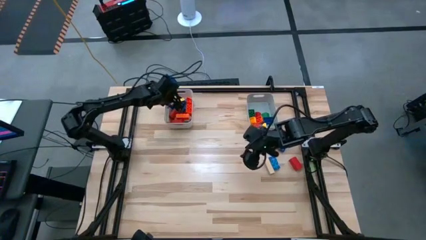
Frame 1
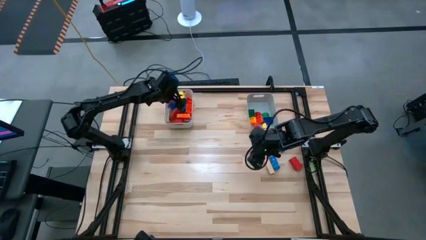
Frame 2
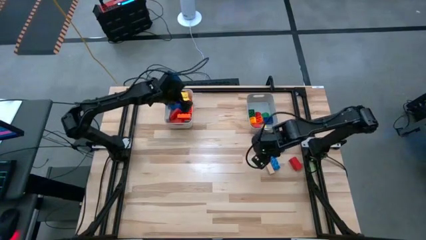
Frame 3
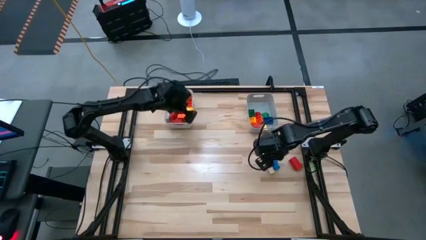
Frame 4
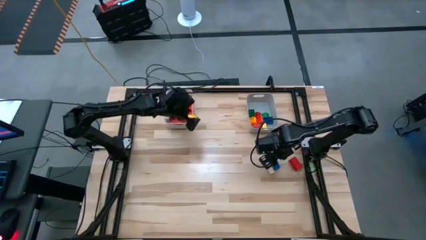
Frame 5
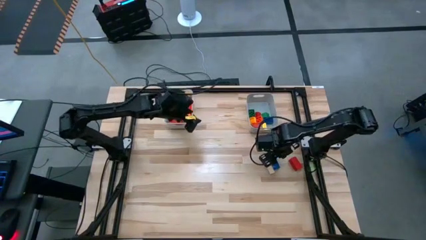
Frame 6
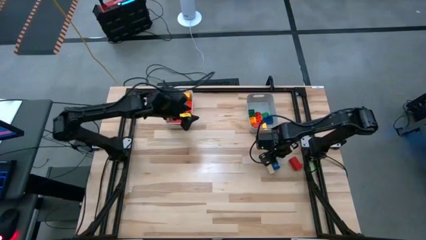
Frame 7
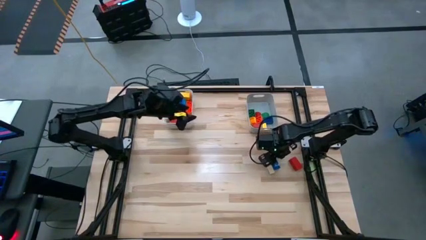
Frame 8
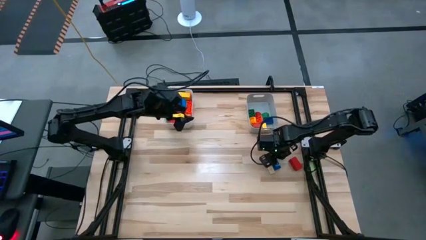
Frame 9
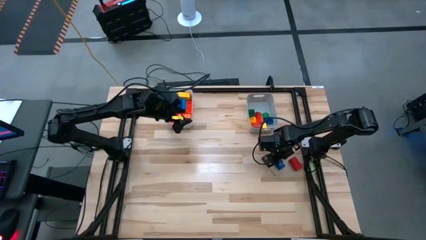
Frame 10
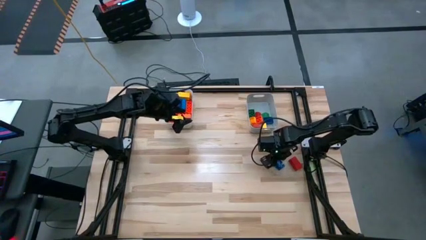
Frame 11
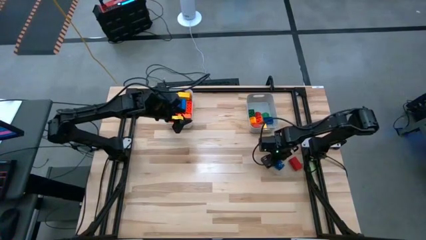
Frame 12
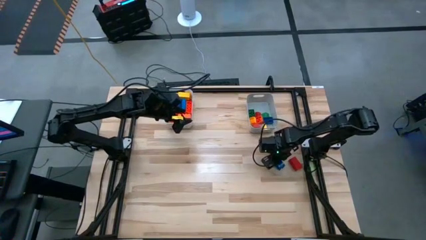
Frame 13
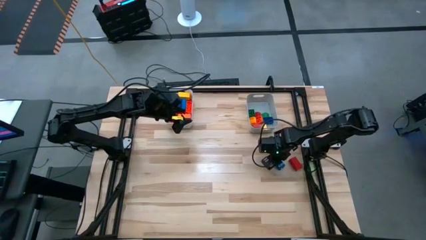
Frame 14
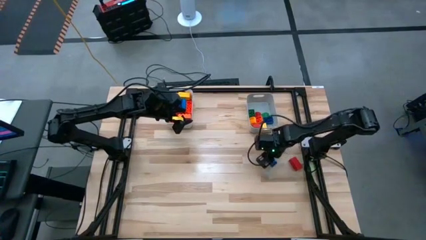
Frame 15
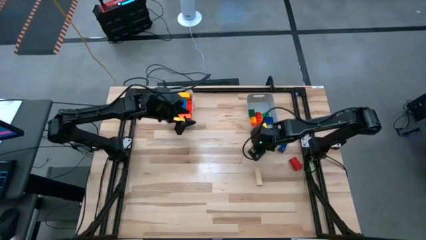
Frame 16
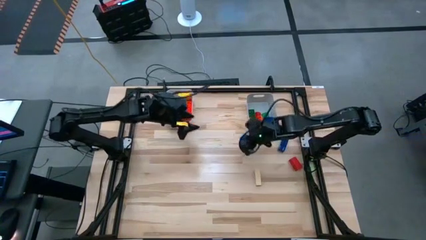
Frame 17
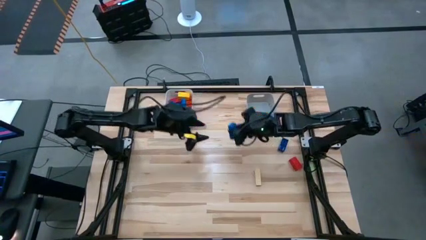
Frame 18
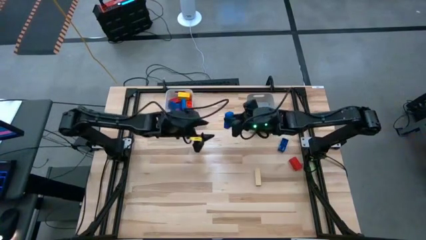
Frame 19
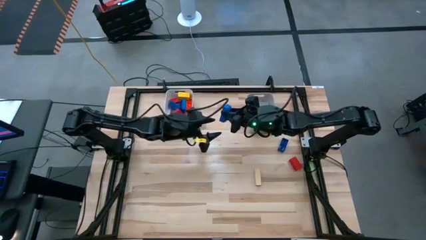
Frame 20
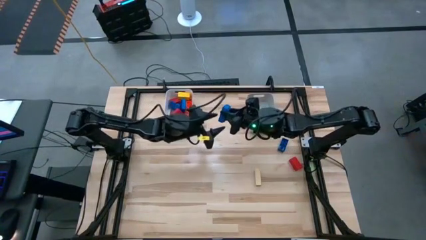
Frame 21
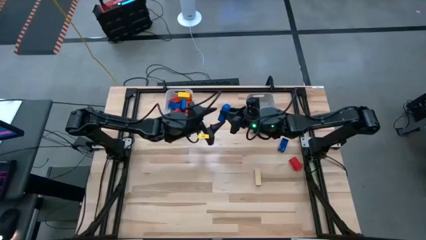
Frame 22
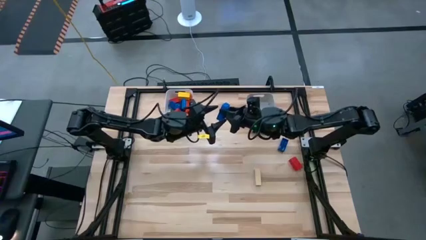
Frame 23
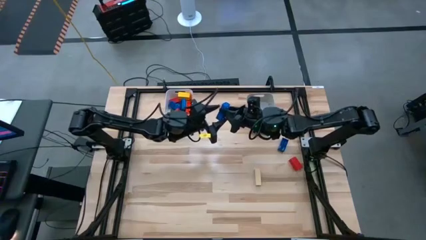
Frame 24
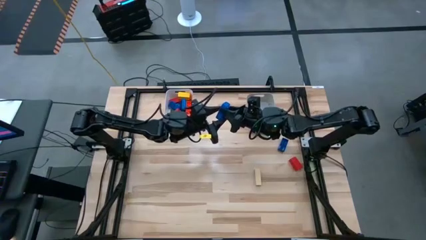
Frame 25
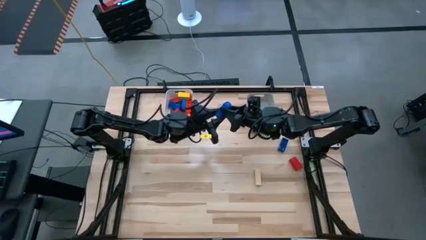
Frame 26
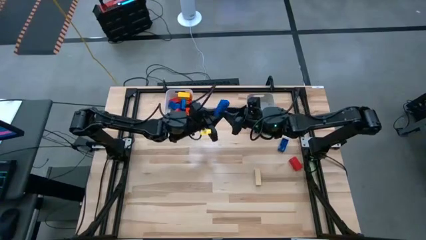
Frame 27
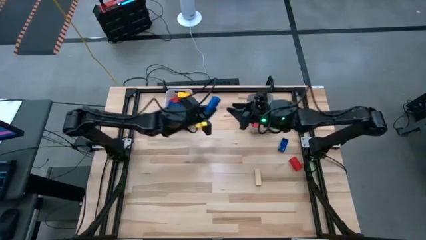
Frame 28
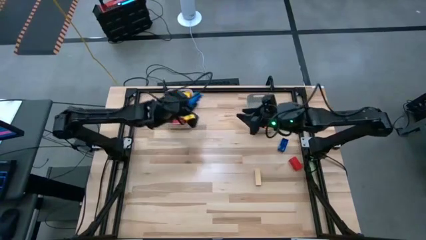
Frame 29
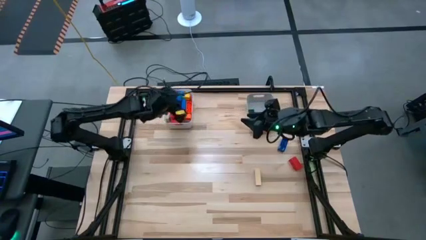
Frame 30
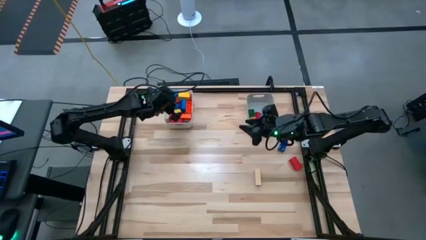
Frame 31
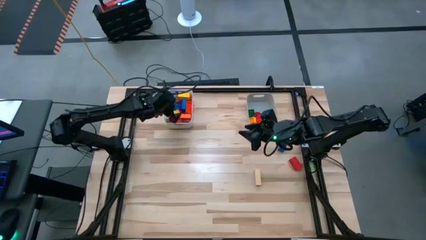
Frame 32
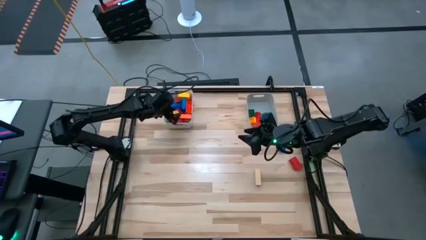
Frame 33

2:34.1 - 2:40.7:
Task: Sort blocks by size
Put the blue rectangle game piece into the white bin

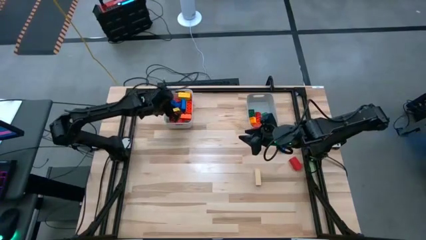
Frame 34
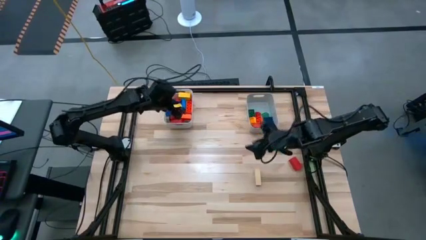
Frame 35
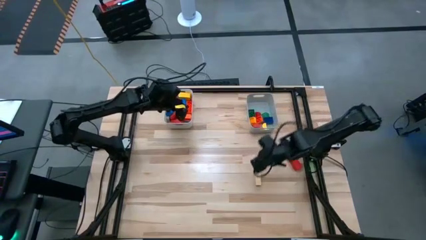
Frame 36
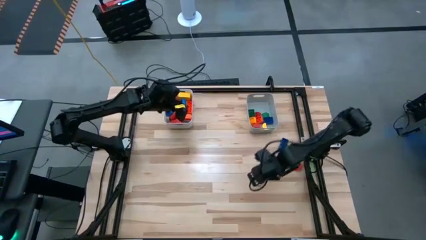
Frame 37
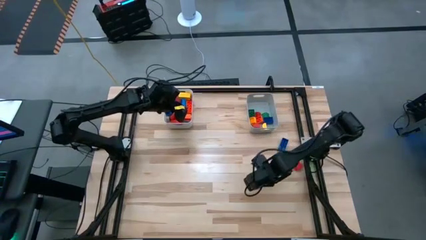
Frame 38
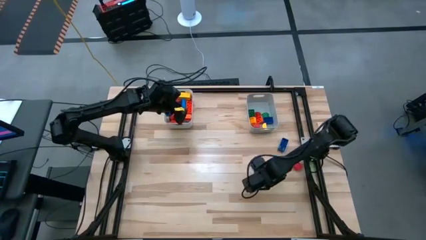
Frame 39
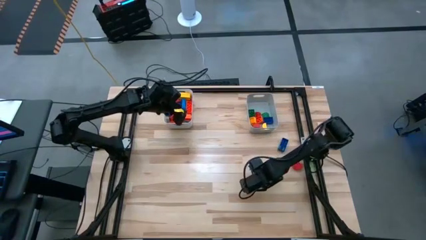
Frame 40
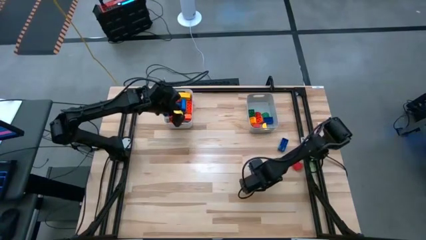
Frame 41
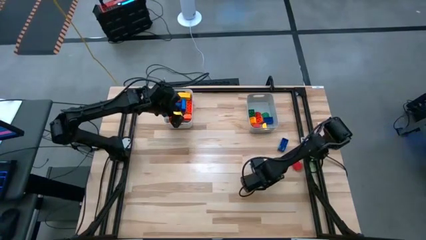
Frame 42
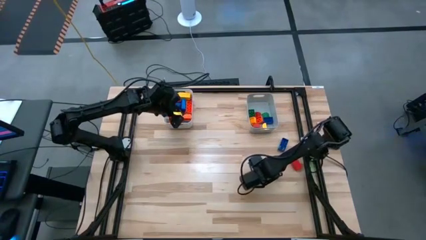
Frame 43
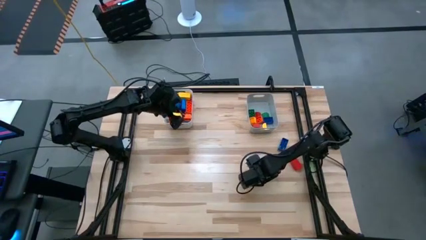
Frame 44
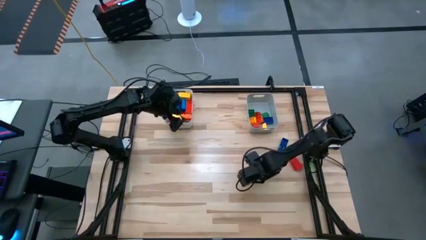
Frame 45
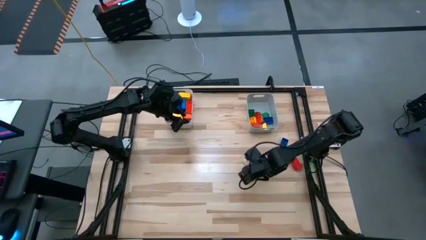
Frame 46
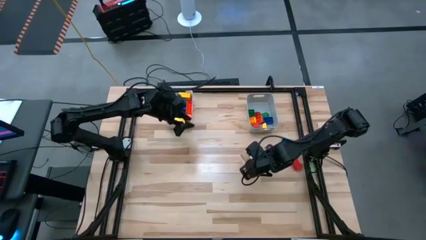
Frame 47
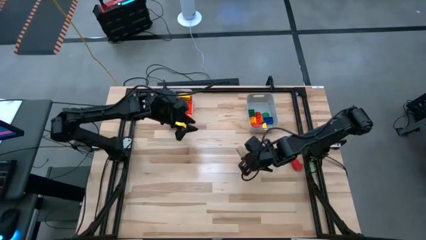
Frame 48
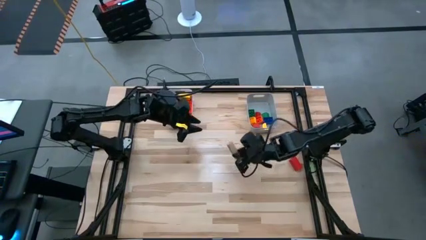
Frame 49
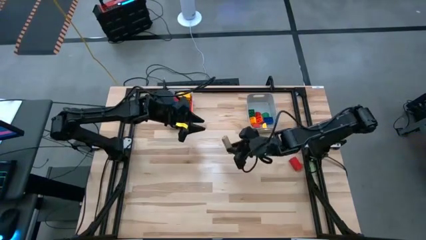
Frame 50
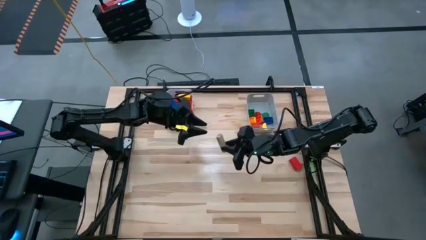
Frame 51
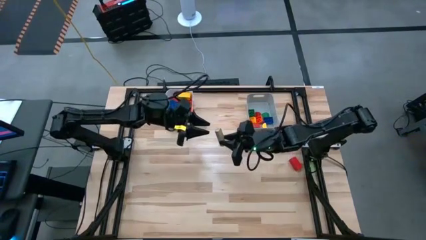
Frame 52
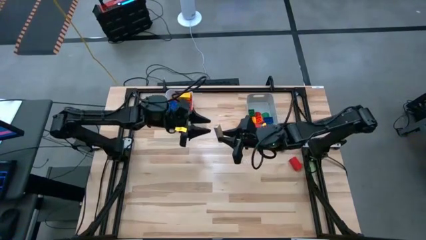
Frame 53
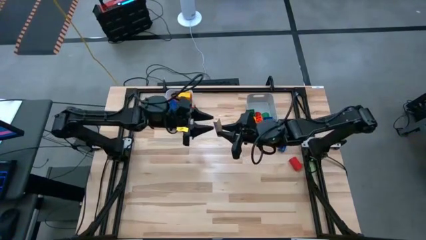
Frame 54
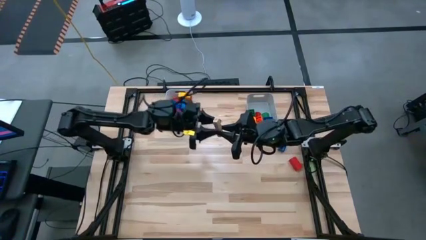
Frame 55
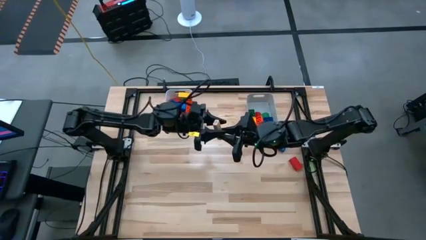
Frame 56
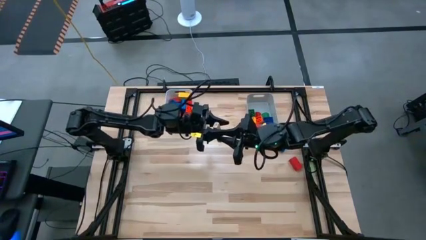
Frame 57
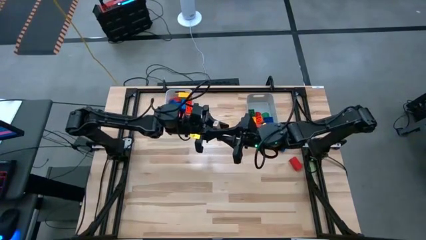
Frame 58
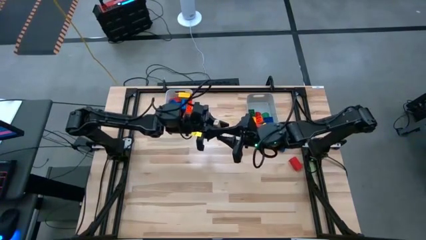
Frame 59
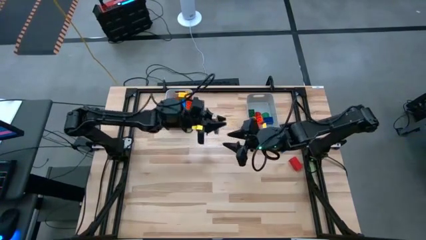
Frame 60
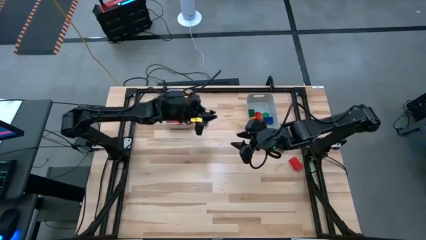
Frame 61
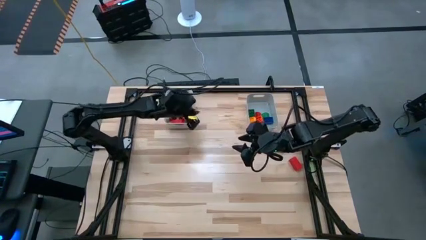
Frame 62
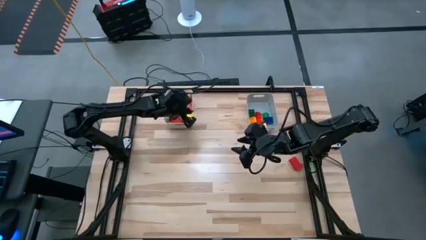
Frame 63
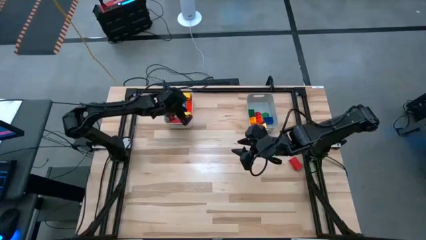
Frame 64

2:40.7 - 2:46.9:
Put the light brown rectangle wooden block into the white bin

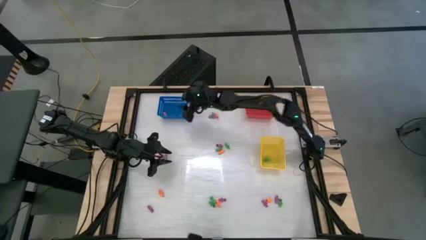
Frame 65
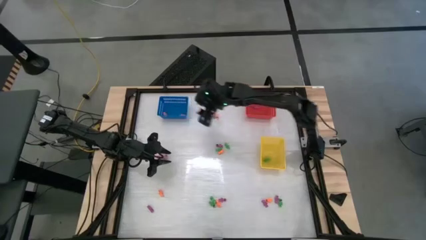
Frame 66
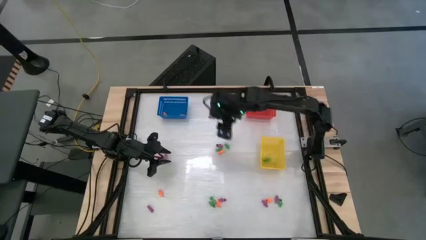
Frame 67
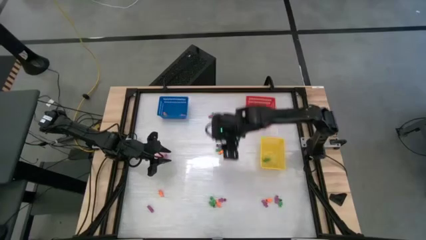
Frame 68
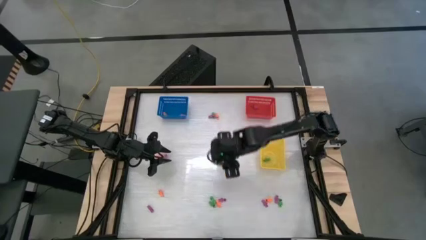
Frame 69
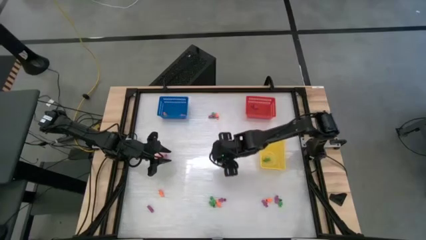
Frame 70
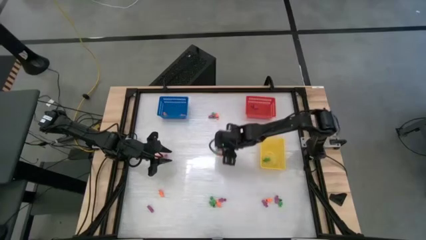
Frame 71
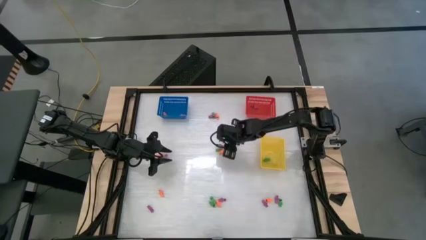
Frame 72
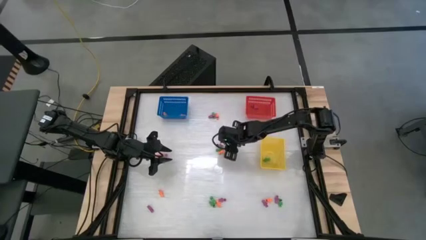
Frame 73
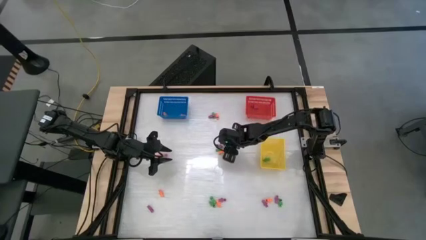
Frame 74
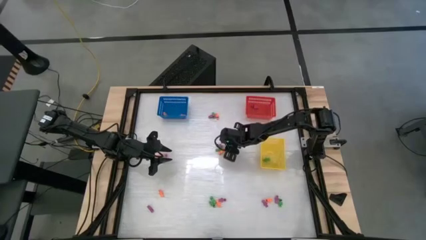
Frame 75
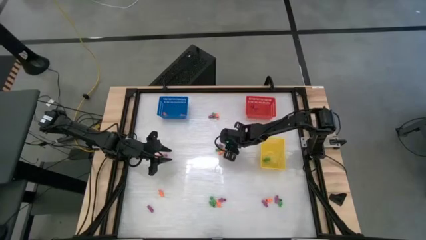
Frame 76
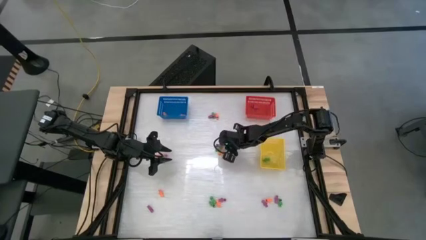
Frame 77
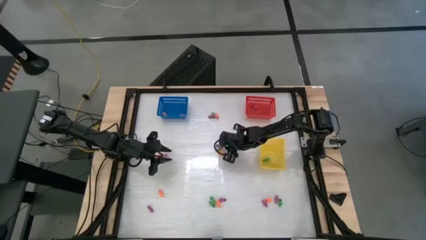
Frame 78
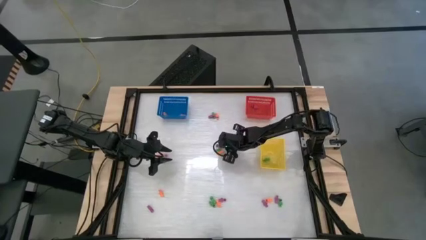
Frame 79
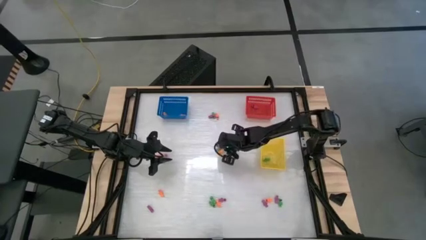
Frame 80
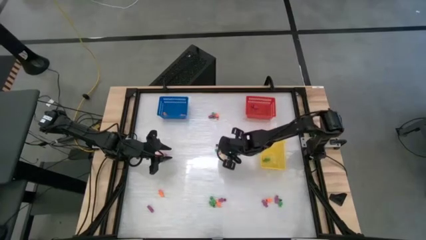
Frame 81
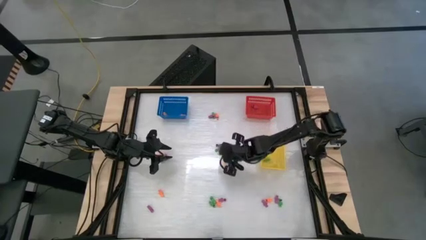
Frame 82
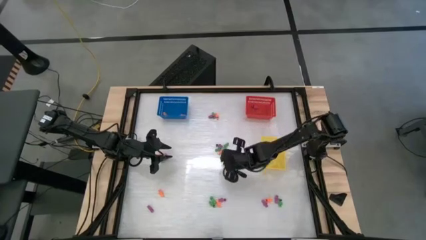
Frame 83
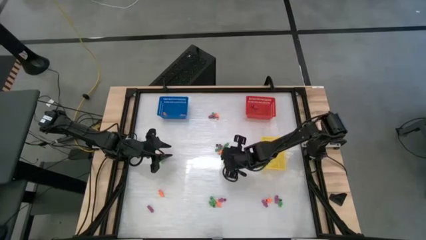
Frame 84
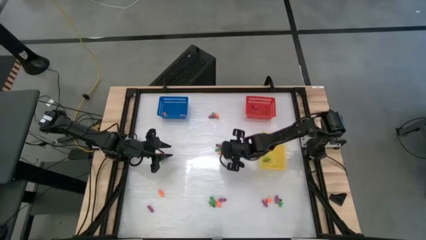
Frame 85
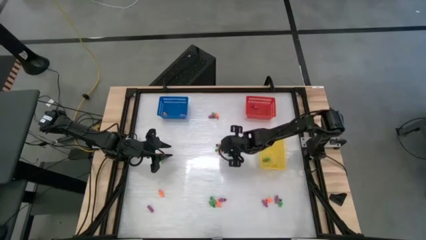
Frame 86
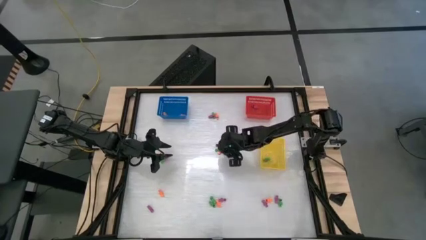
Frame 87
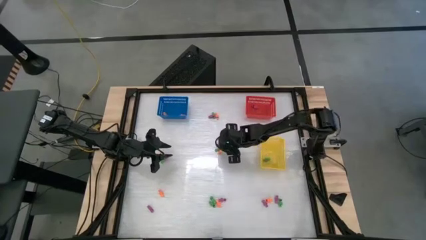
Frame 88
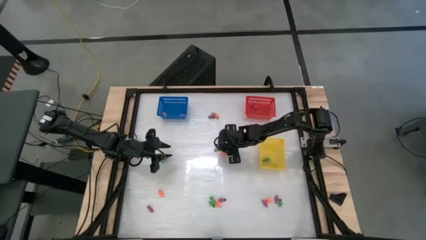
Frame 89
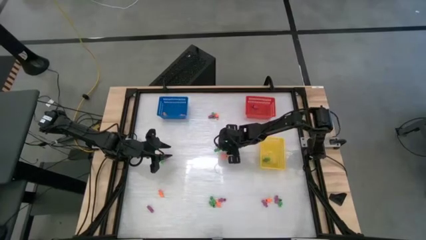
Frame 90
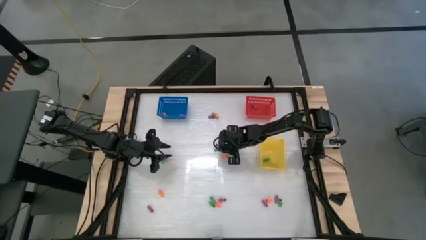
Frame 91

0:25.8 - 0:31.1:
Task: Sort Halloween decoration
Put the green skeleton toy into the yellow bin
